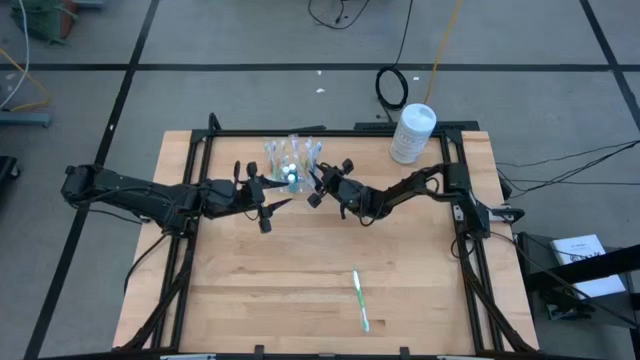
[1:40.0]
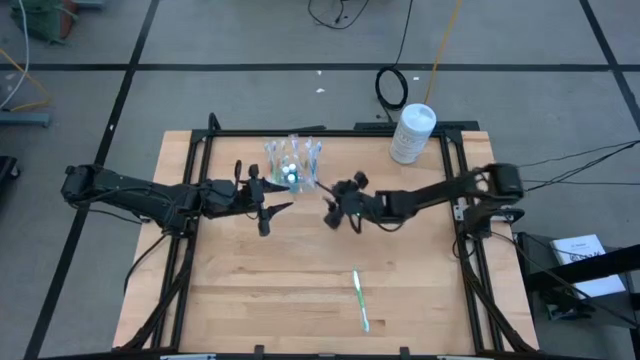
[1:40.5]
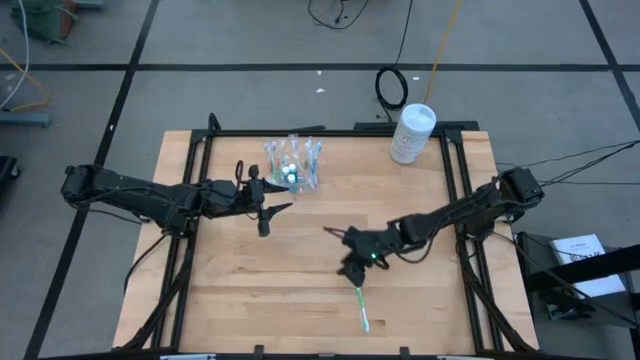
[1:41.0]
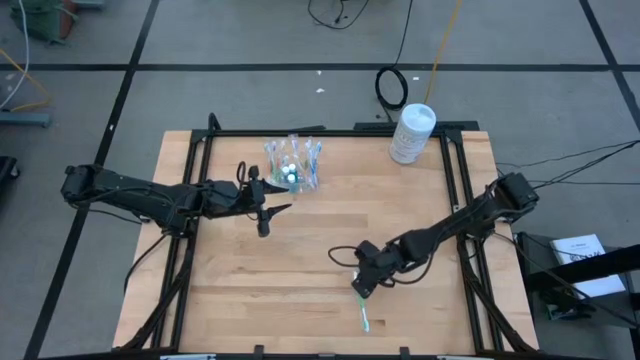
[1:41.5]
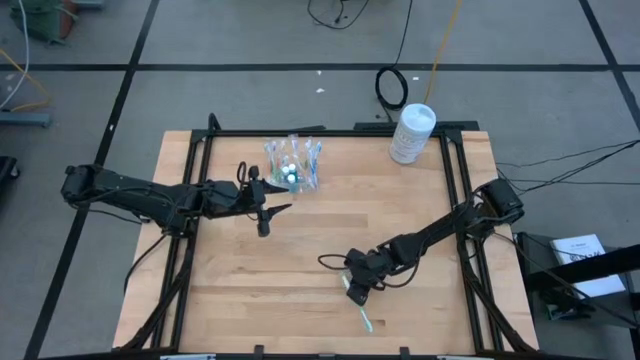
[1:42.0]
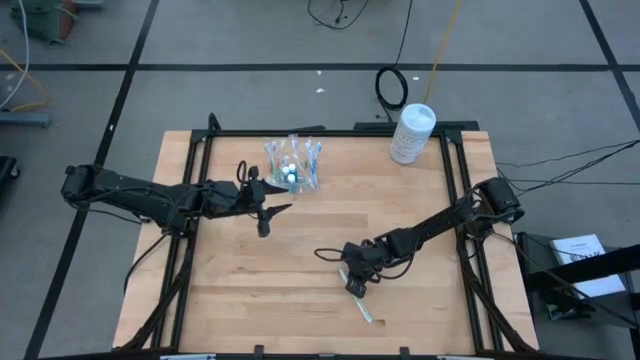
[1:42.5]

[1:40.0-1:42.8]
Task: Pick & Place toothbrushing station
Put the green toothbrush into the transparent organizer

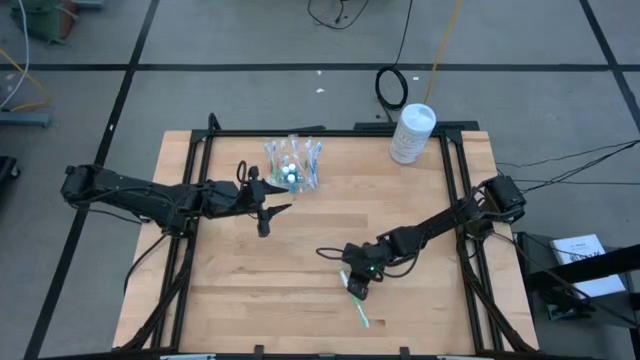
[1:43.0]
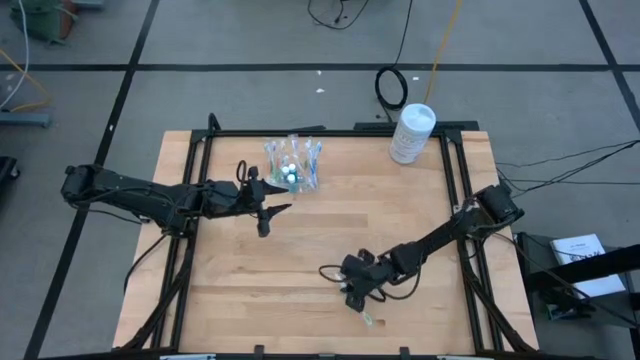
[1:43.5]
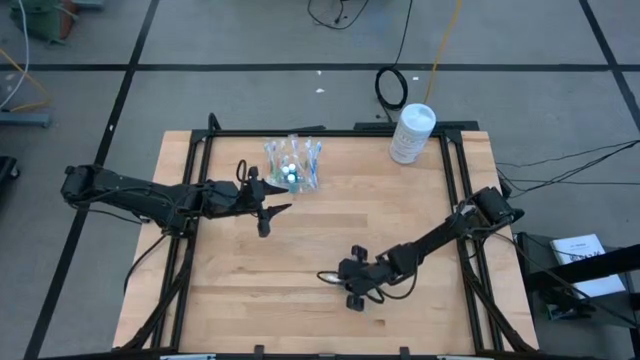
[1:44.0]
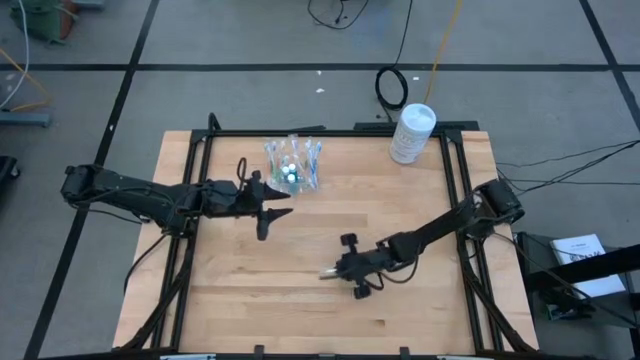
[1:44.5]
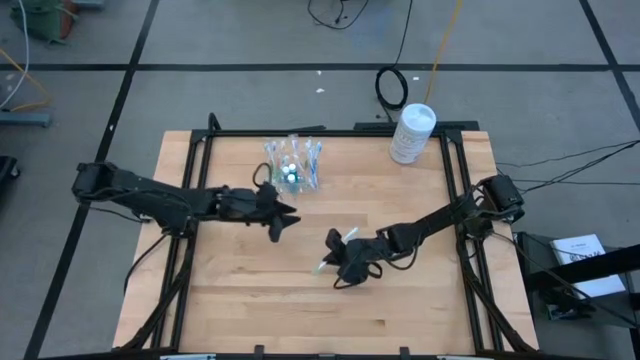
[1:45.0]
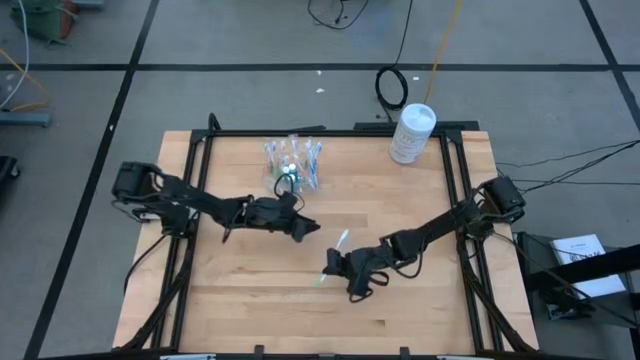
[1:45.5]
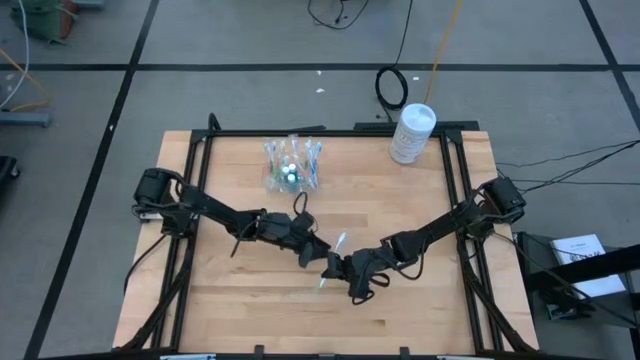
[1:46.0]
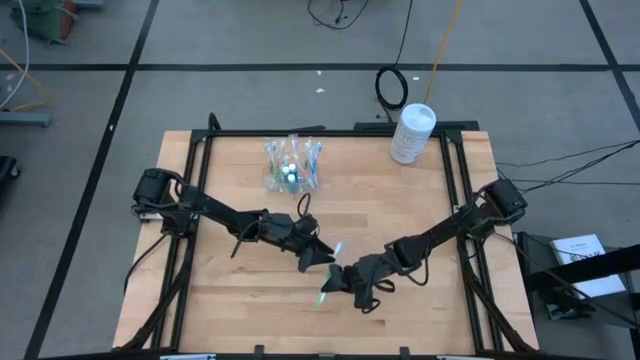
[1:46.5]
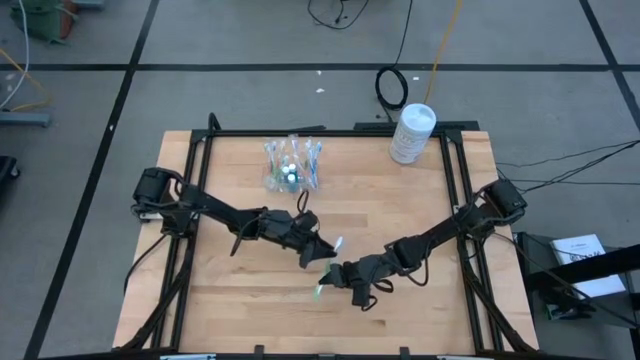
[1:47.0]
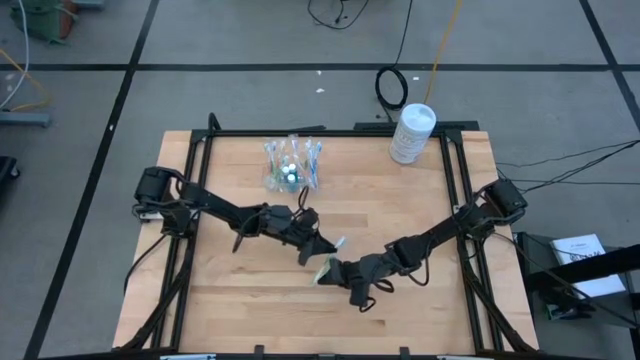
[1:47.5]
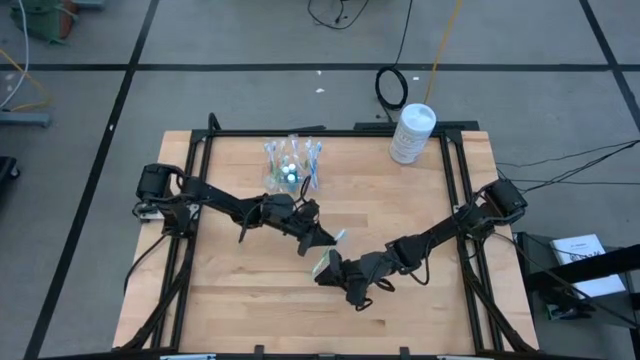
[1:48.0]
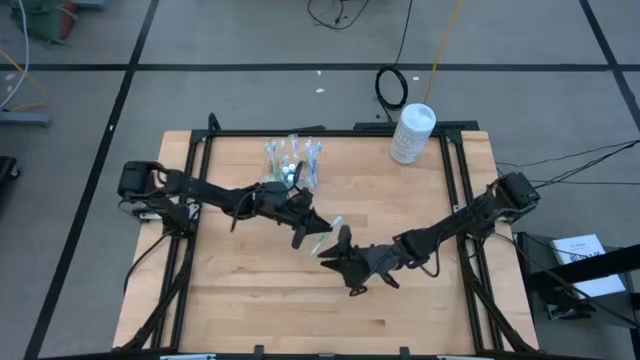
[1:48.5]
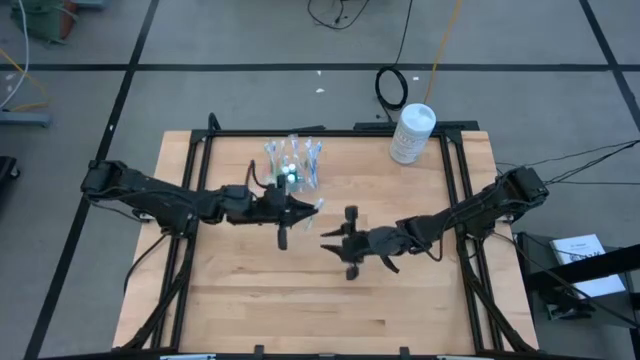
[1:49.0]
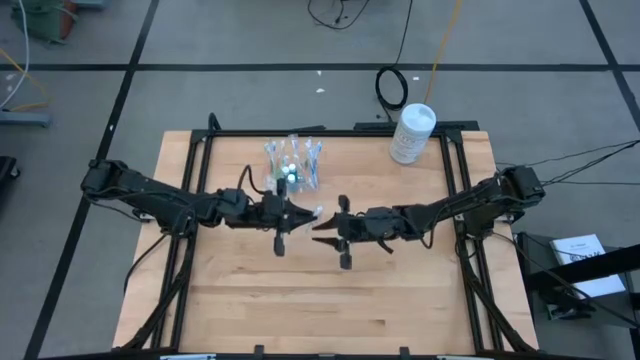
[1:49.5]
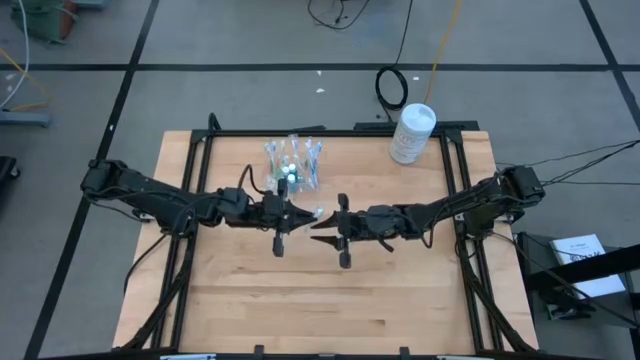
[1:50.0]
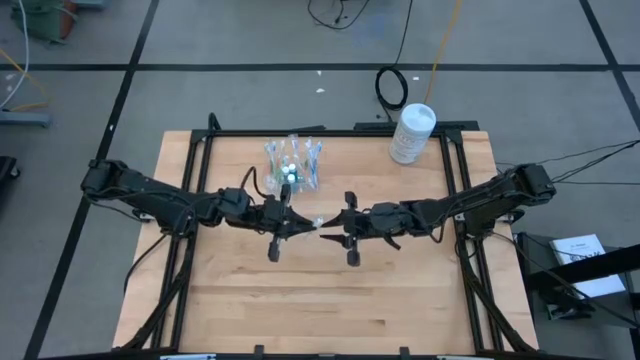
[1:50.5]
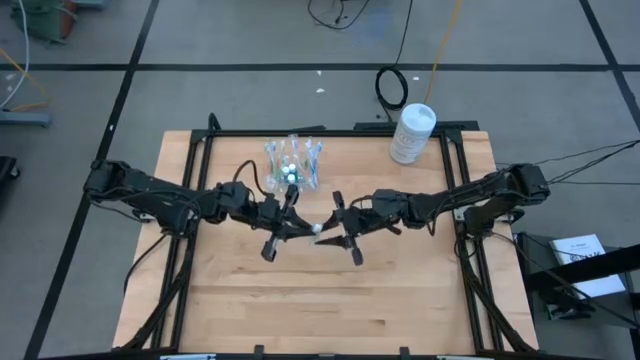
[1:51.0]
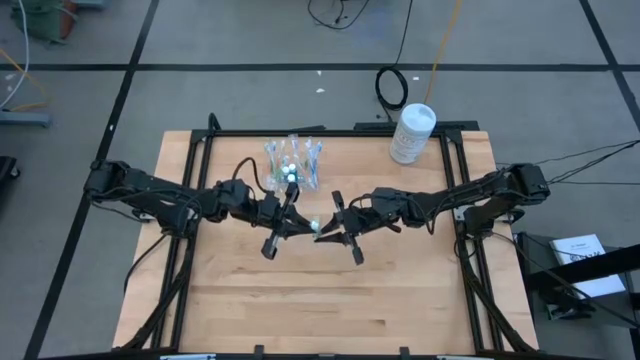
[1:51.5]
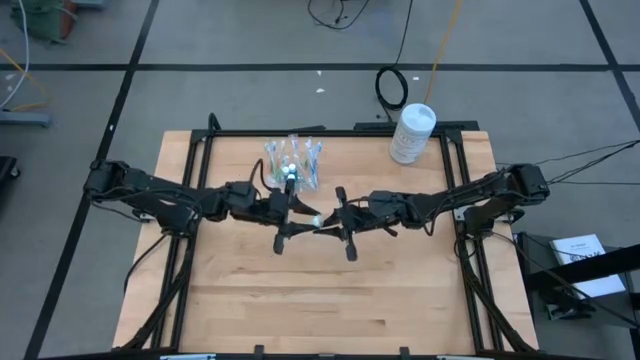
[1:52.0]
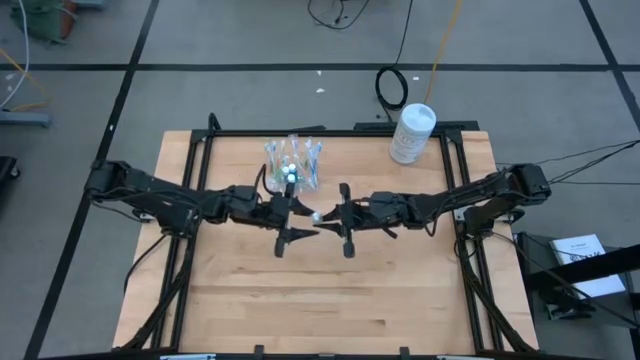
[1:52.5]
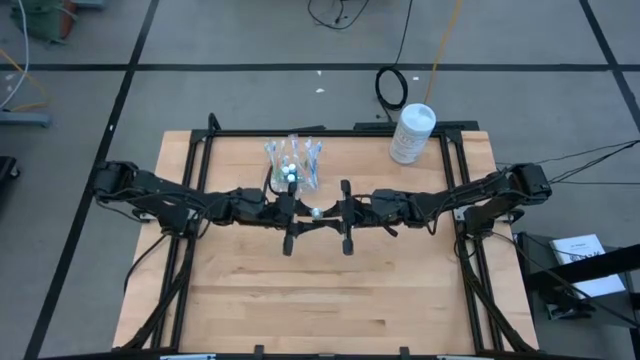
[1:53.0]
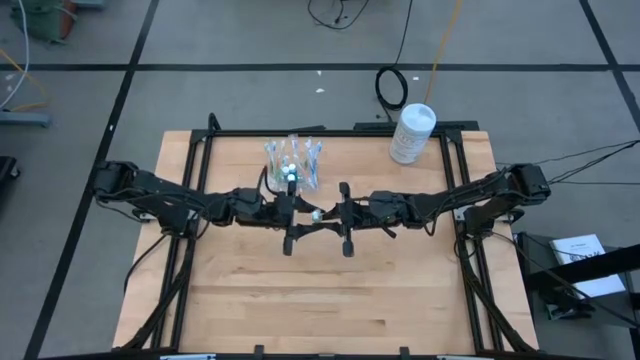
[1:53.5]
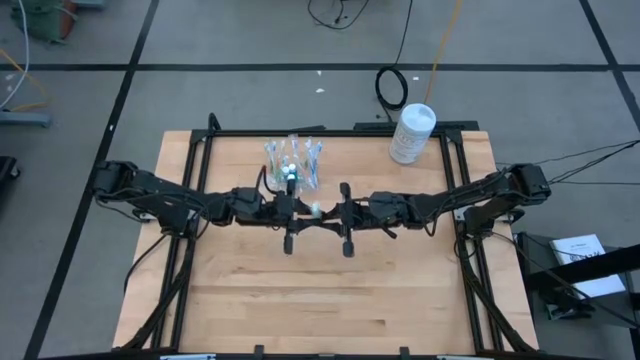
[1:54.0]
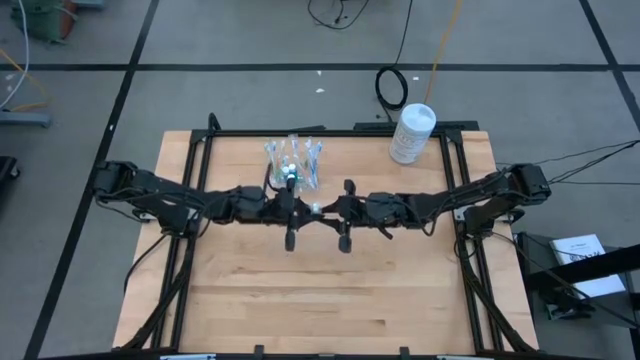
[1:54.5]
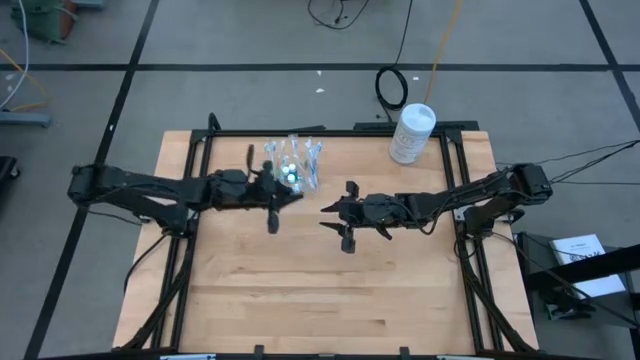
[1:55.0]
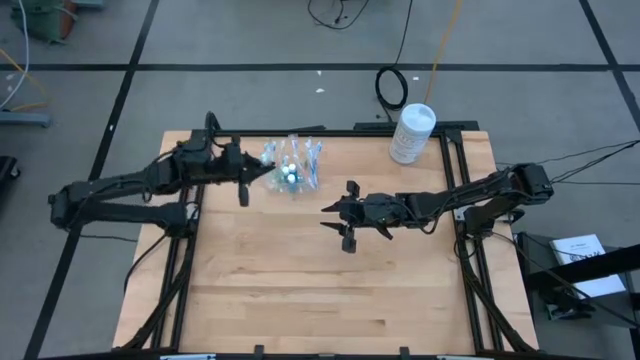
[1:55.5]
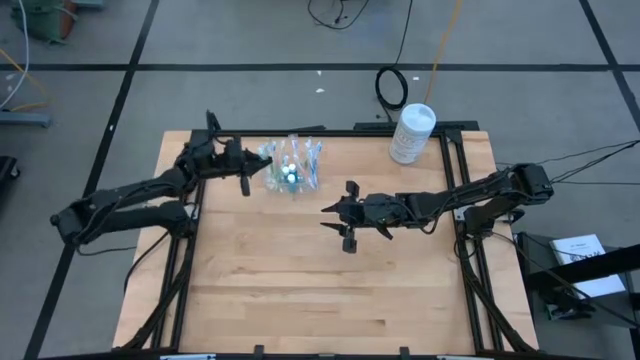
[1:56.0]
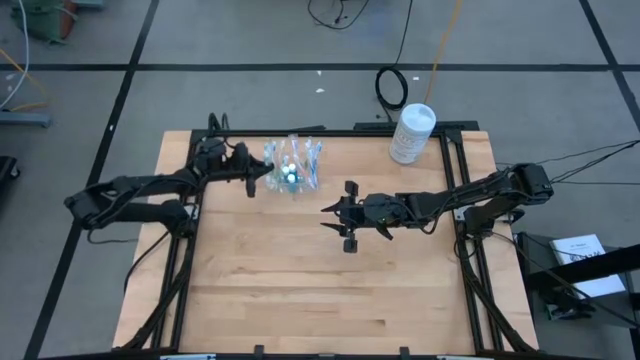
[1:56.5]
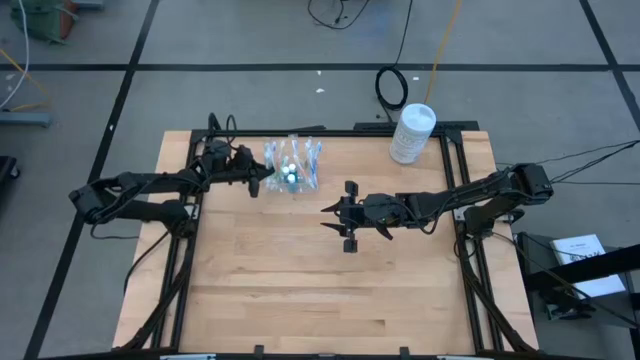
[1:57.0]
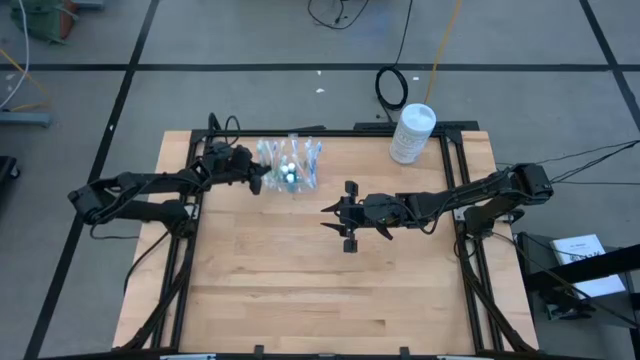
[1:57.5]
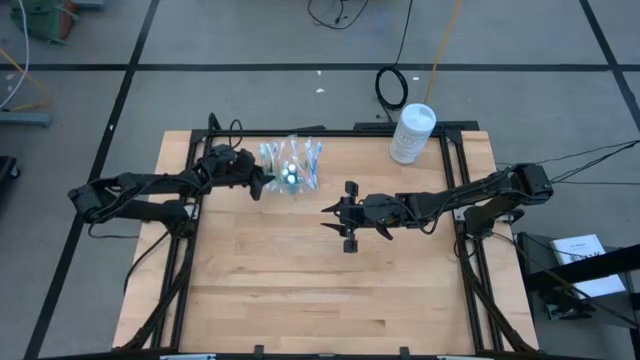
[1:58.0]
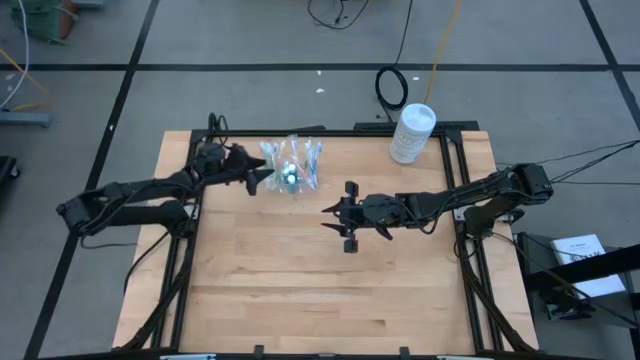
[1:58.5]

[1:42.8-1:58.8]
Put the green toothbrush into the transparent organizer

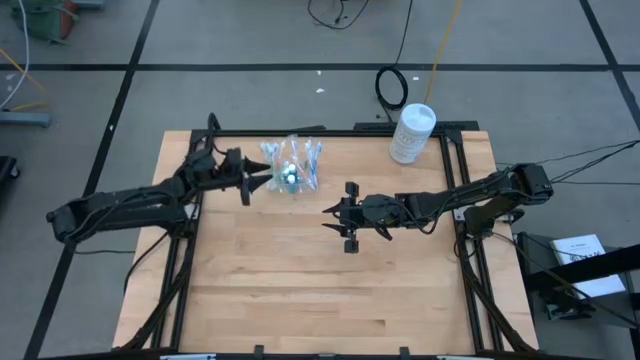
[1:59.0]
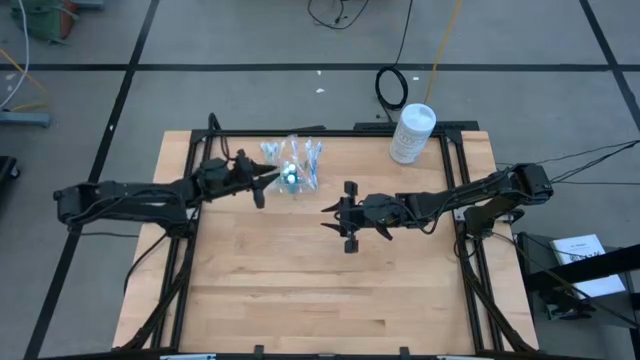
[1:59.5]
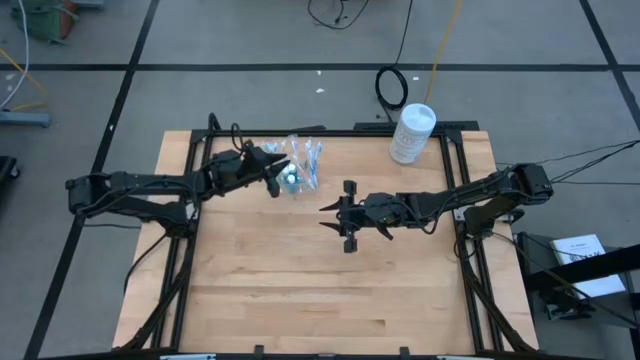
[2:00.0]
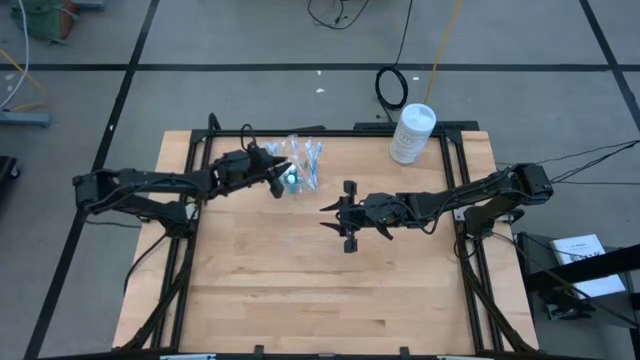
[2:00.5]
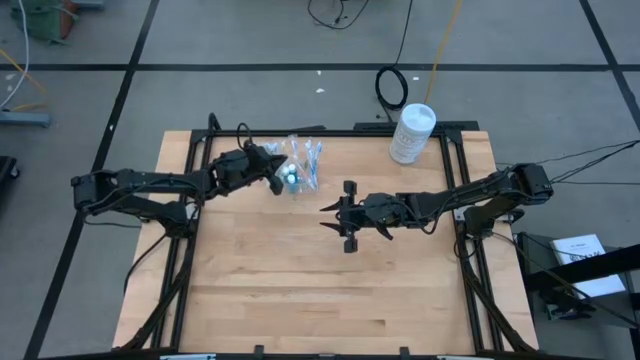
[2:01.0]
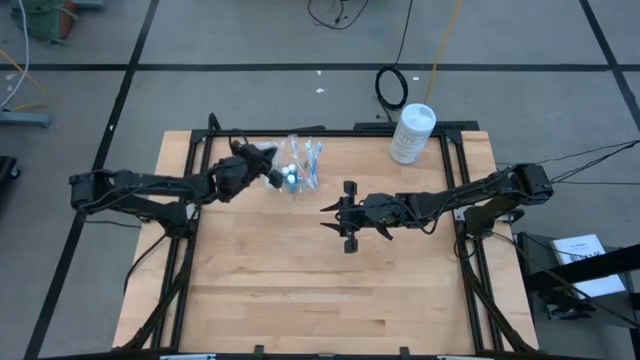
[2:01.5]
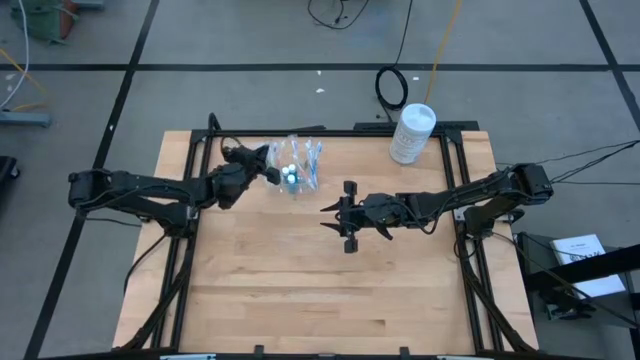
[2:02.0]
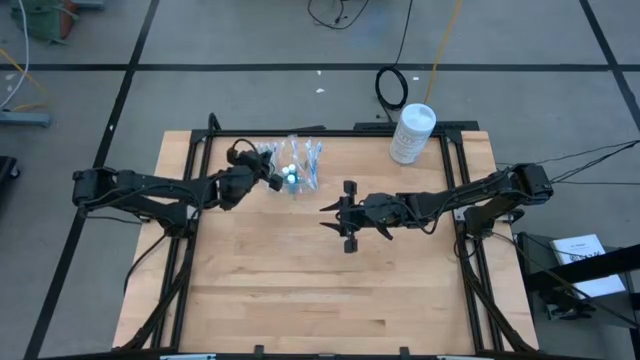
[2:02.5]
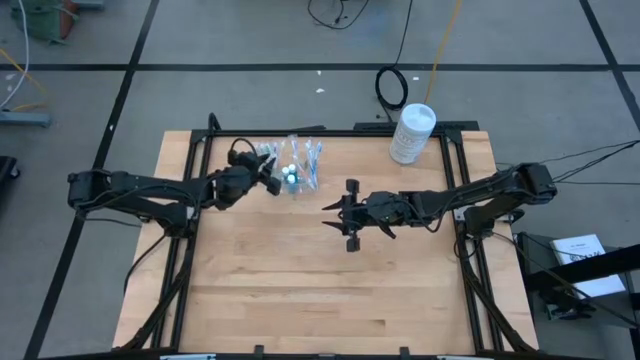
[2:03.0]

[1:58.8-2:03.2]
Adjust the green toothbrush in the transparent organizer
